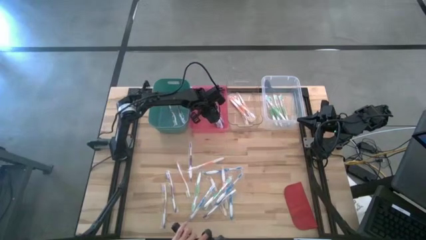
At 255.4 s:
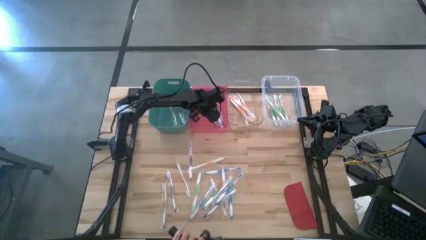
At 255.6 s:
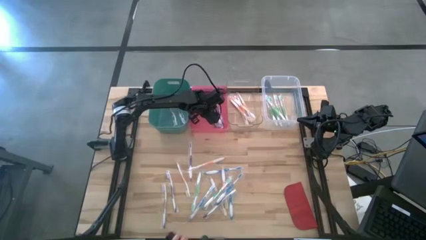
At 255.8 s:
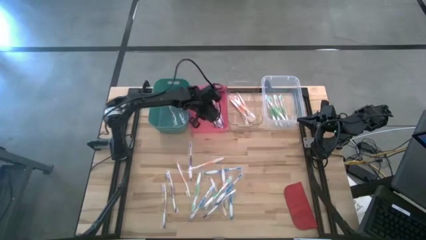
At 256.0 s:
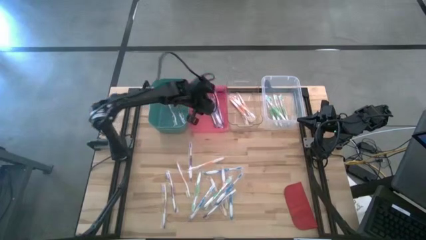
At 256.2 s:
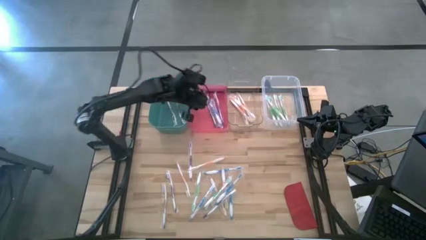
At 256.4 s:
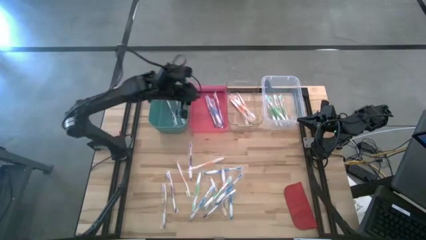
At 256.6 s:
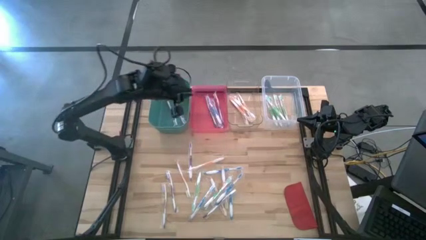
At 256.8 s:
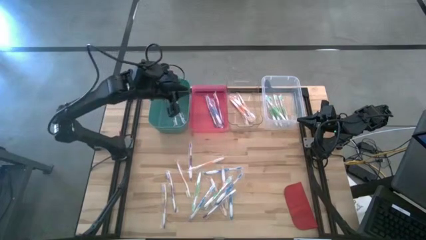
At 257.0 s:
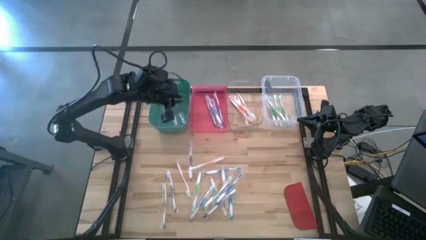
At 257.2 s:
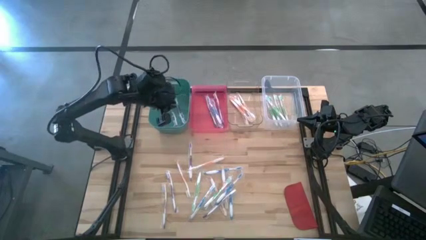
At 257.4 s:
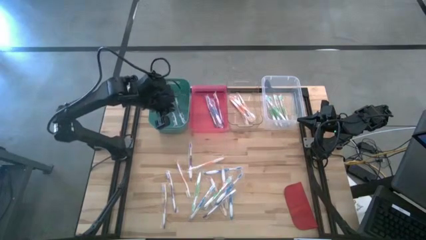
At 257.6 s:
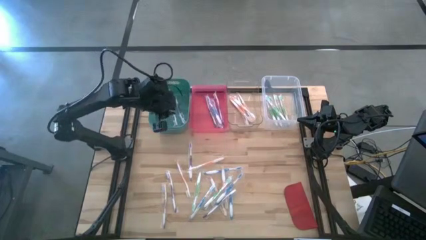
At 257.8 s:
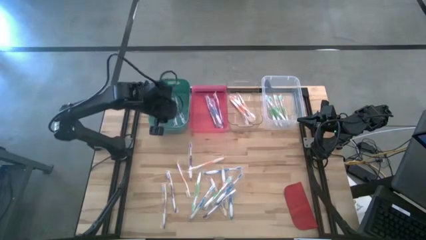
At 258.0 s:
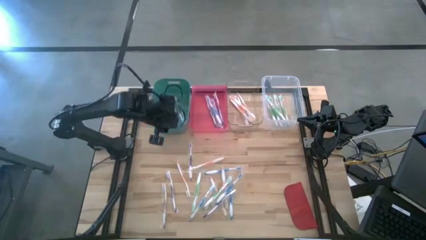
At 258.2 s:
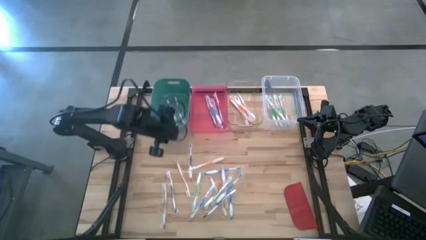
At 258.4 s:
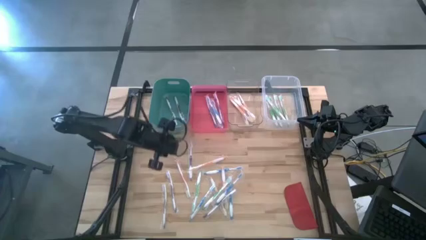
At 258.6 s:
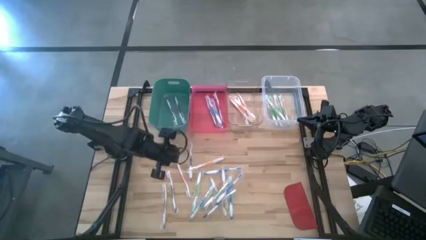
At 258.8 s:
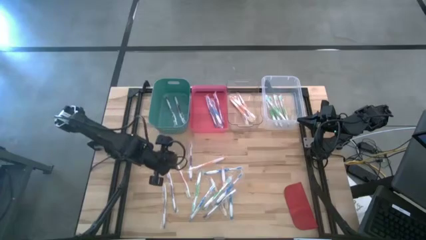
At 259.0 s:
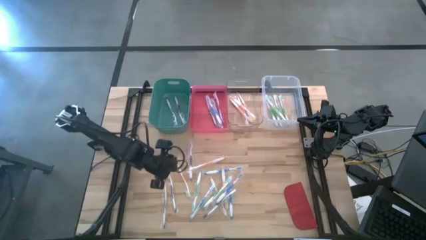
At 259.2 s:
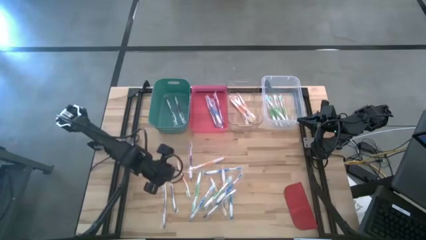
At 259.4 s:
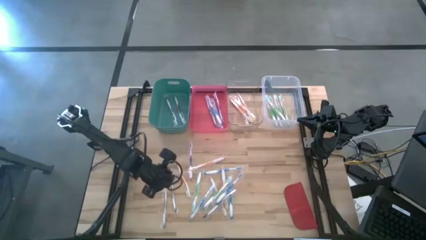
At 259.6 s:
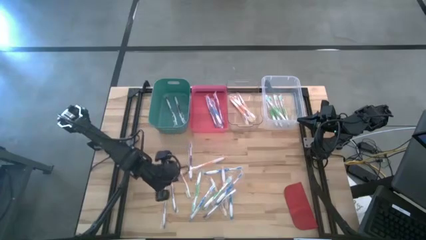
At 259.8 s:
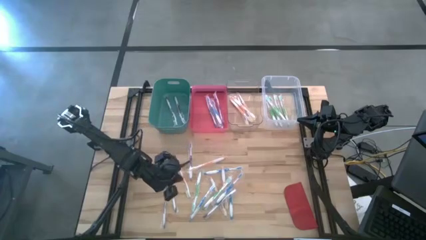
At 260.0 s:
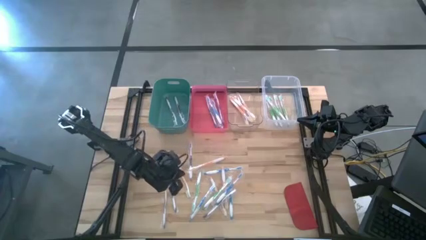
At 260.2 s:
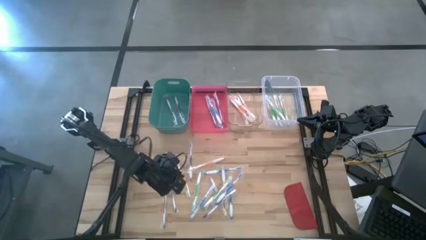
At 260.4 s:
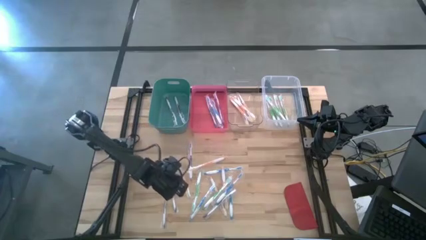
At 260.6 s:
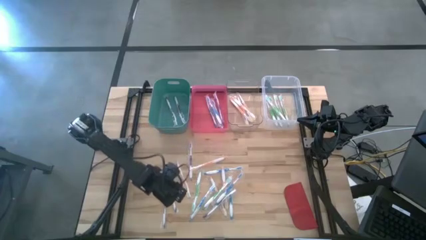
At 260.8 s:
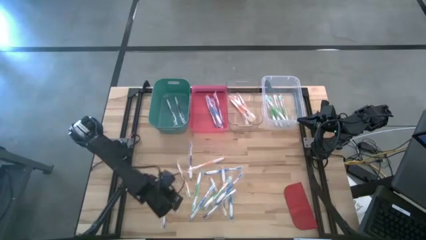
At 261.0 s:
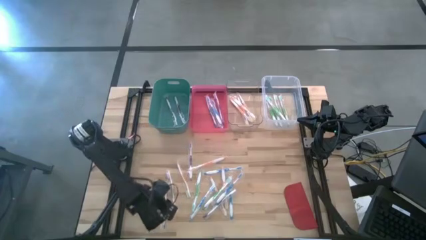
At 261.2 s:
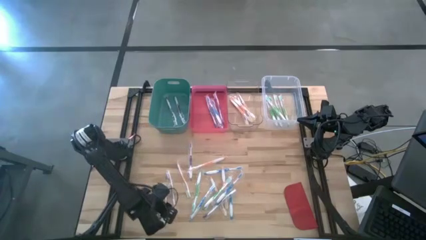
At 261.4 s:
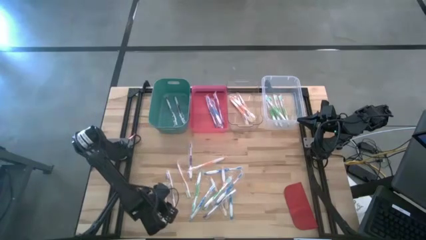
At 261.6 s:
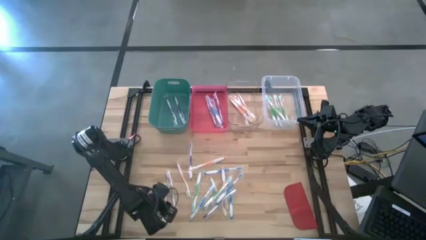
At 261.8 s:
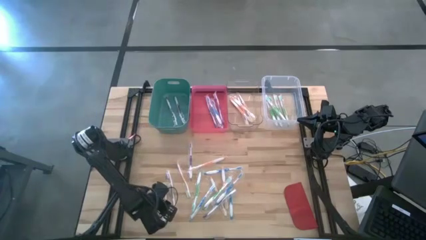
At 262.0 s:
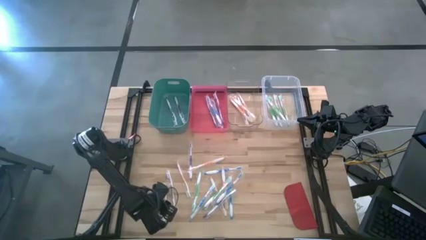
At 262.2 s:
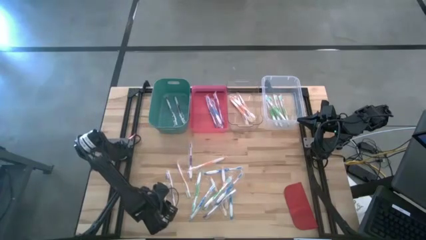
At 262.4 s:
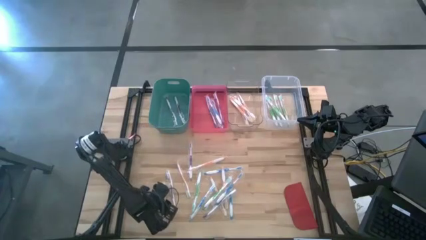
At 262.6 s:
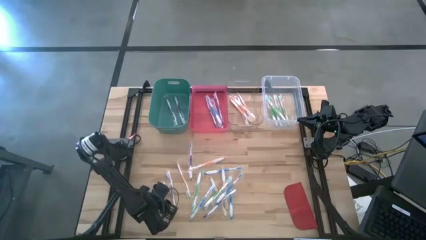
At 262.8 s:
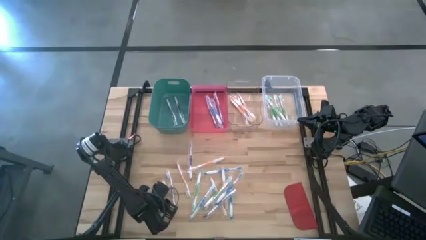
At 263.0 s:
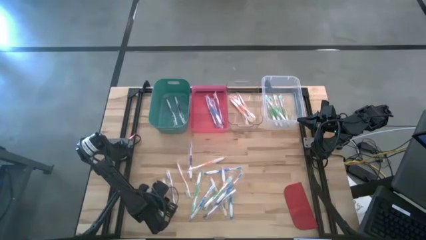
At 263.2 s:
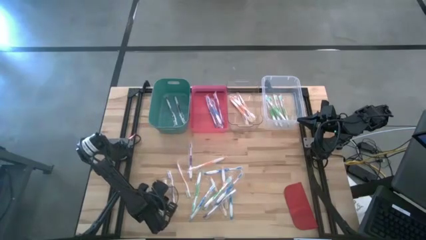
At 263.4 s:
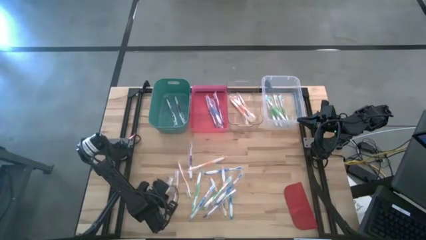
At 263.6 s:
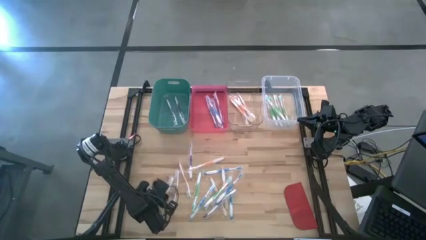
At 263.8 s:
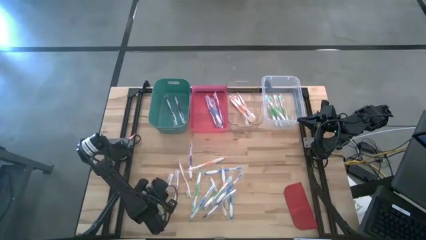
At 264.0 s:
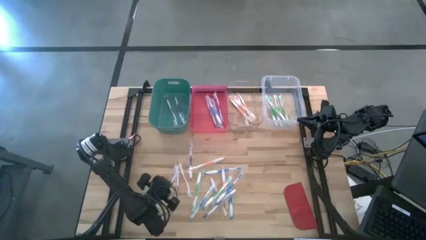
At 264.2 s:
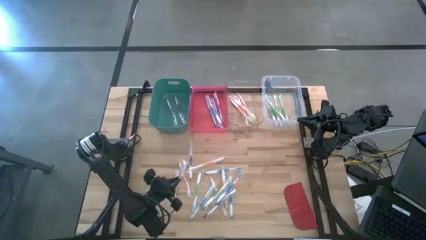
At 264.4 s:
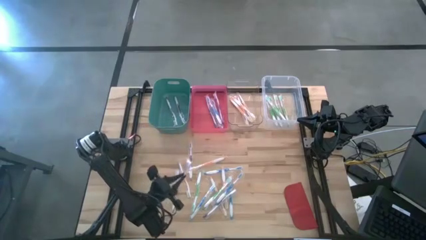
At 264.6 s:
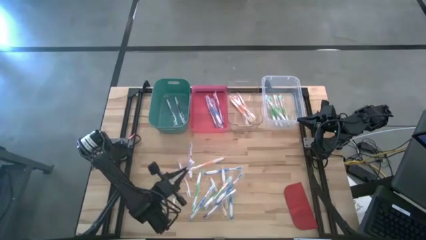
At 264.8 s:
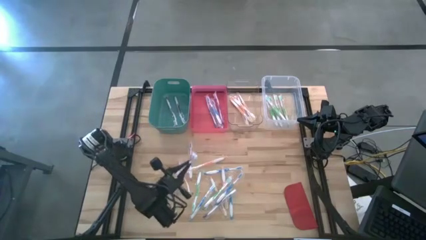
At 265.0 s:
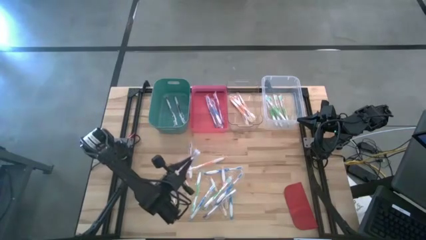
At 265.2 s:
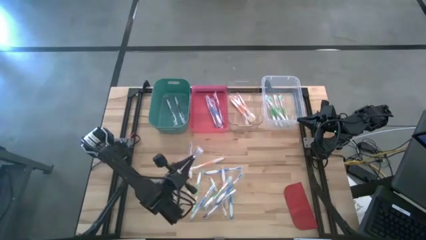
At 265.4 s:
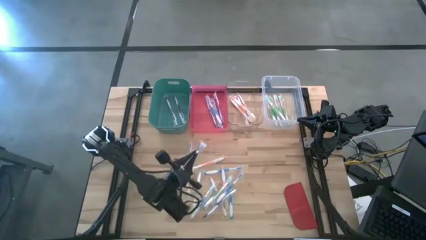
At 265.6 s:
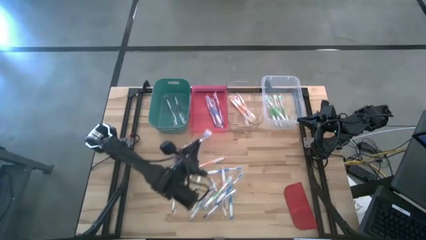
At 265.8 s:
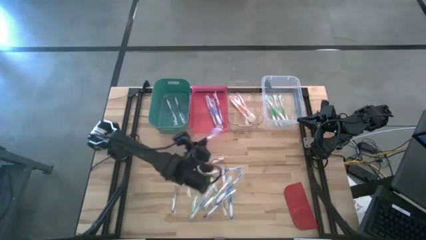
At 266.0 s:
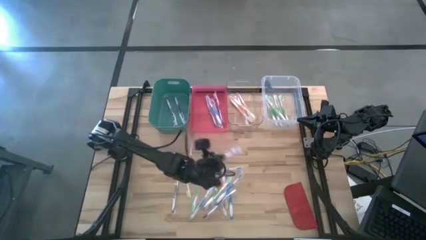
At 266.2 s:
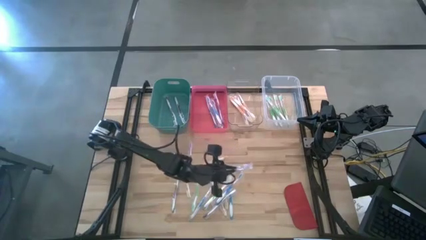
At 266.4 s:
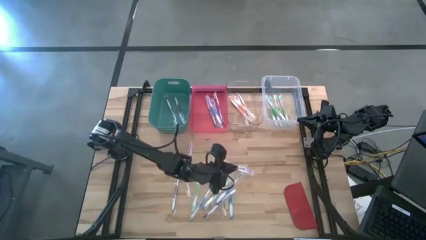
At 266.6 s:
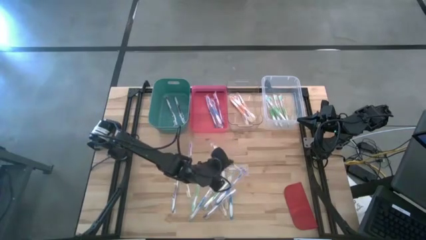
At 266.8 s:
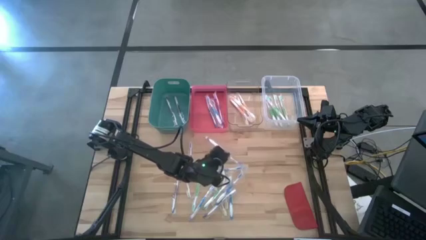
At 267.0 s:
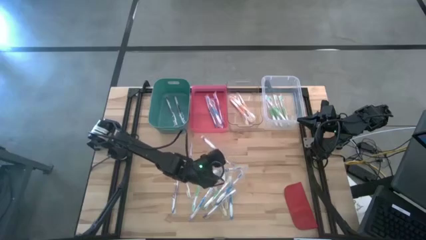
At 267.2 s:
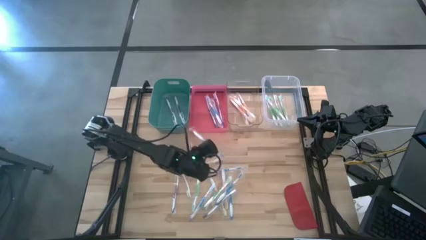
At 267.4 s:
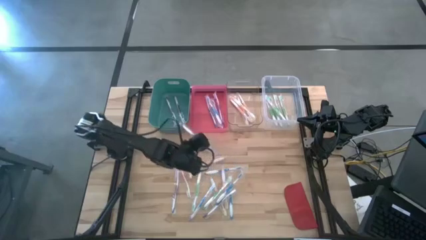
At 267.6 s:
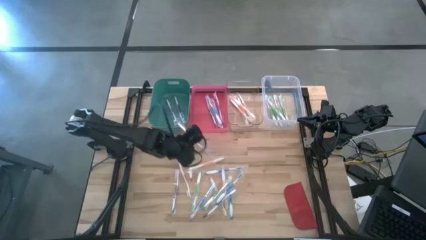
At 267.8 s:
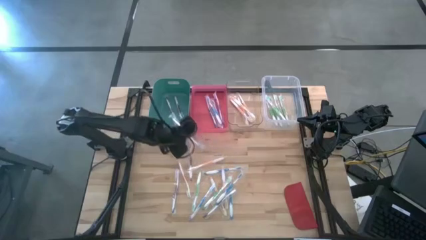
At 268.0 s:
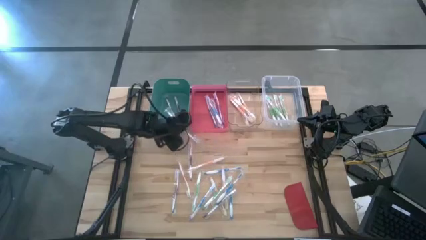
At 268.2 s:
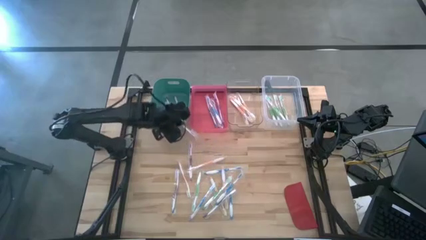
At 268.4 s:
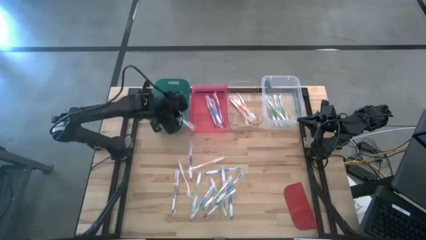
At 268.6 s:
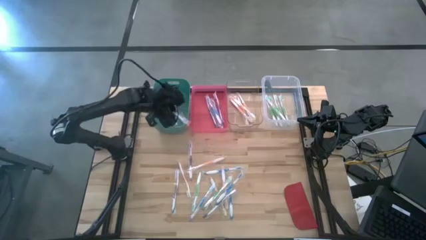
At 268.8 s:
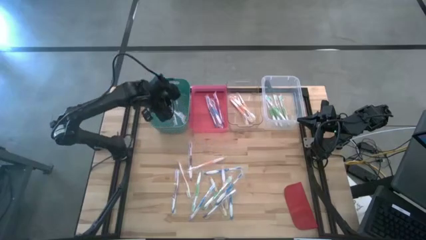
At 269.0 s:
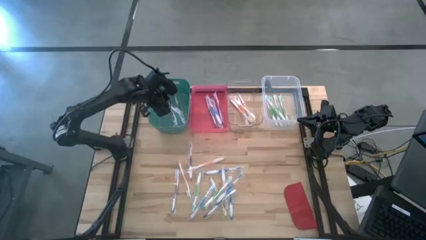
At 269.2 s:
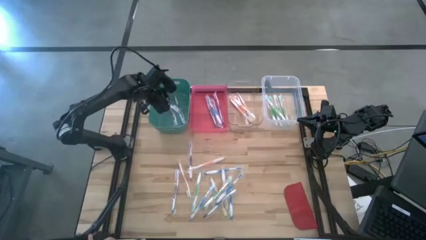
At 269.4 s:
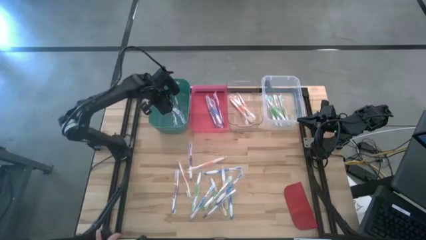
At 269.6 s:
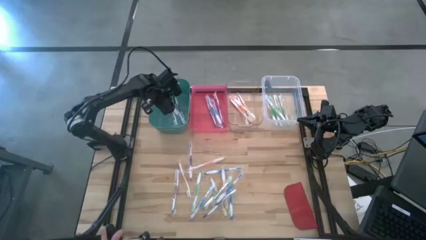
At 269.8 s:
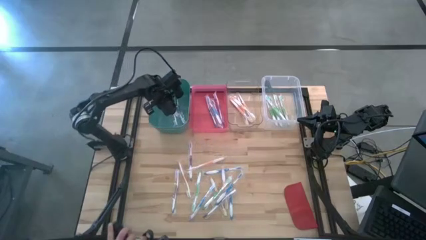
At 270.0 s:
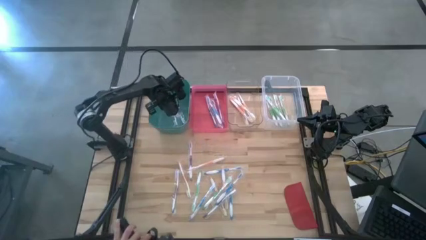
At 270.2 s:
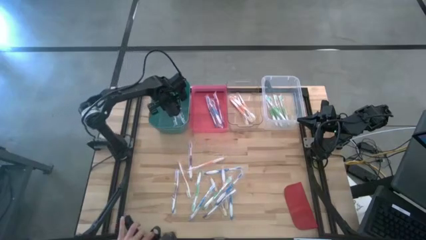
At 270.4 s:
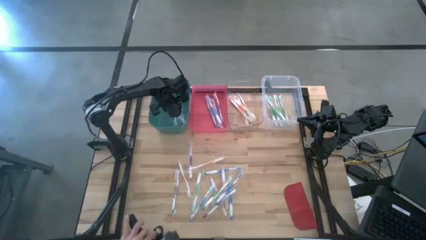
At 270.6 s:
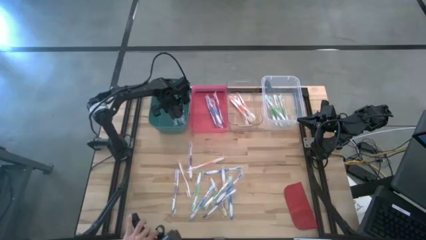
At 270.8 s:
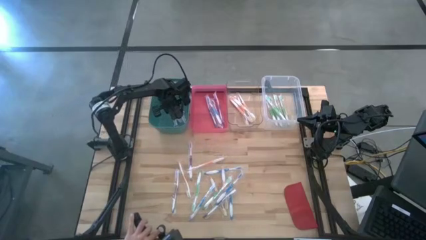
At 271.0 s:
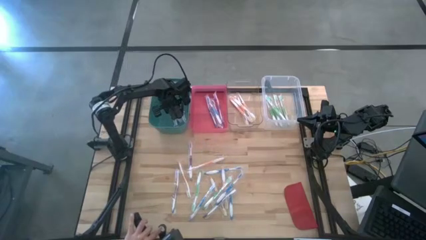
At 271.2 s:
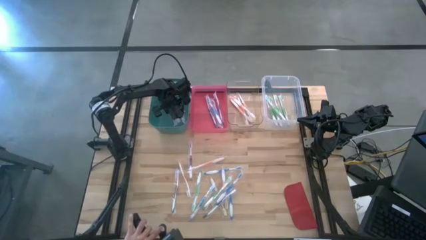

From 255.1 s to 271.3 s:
Task: Pick & Place Toothbrushes
Put the violet toothbrush into the green bin

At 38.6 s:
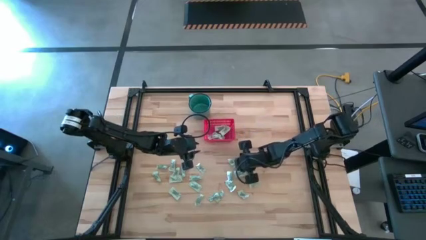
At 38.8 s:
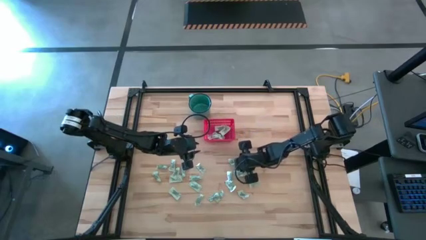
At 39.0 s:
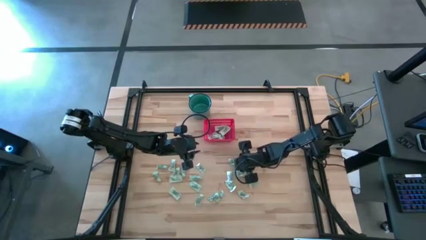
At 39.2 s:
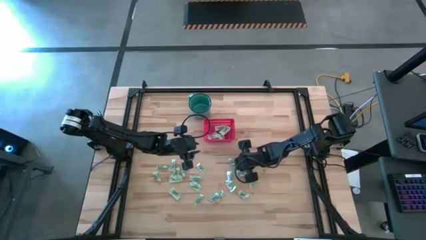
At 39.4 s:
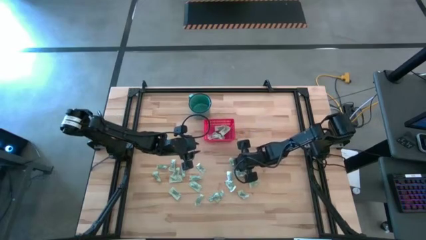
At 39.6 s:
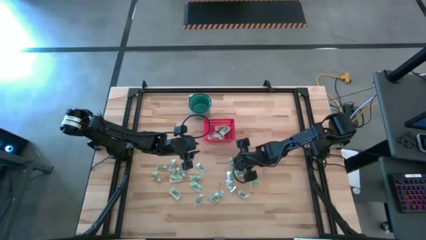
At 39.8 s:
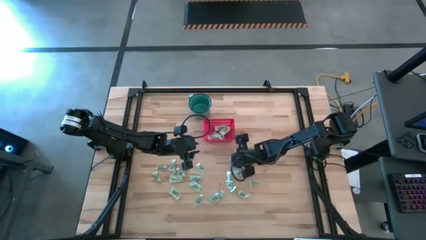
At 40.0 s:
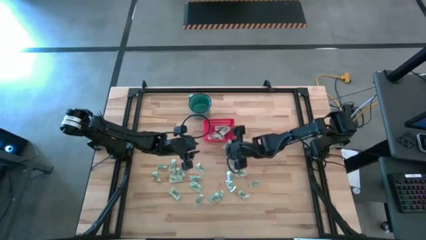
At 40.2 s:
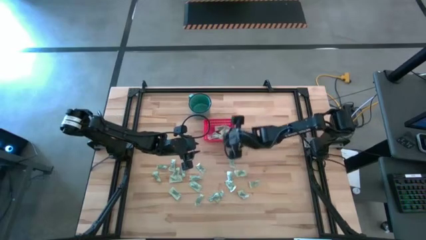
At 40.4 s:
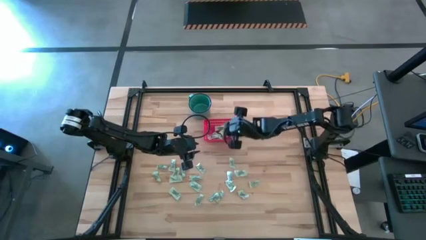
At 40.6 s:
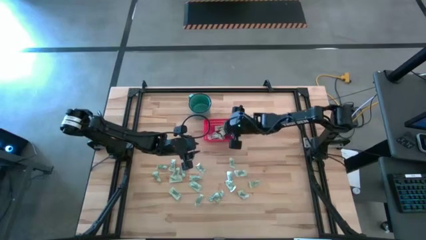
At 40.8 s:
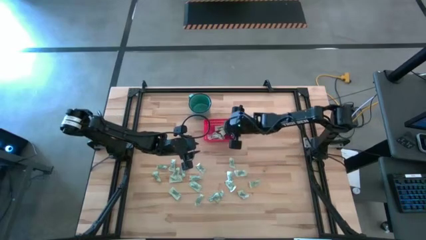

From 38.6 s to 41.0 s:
Task: Pick and place items into bin
Put the light green stevia packet into the red bin
